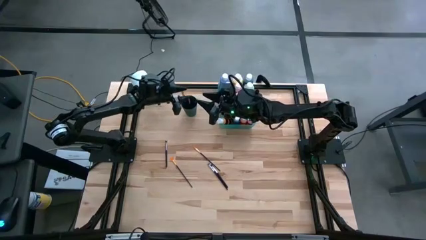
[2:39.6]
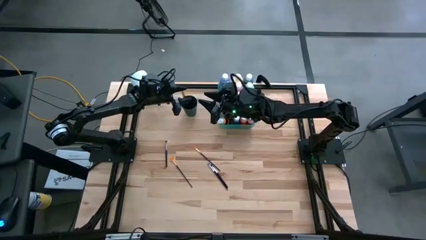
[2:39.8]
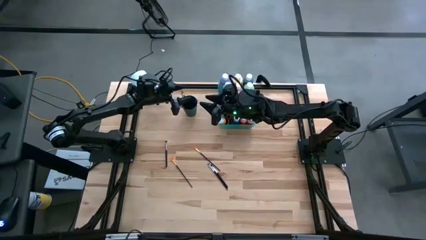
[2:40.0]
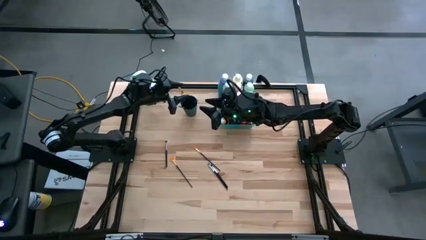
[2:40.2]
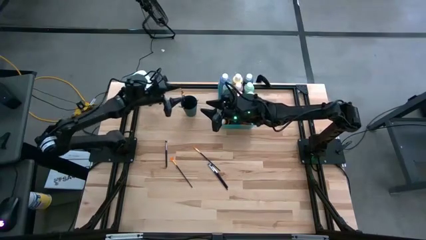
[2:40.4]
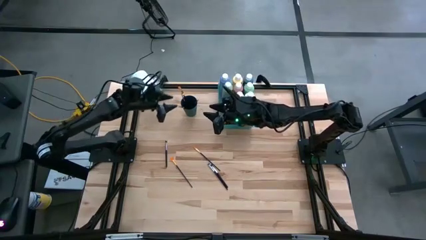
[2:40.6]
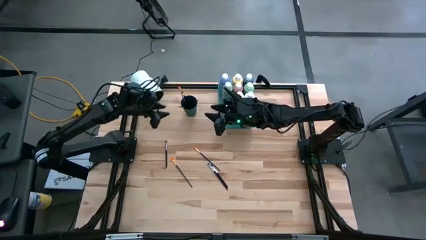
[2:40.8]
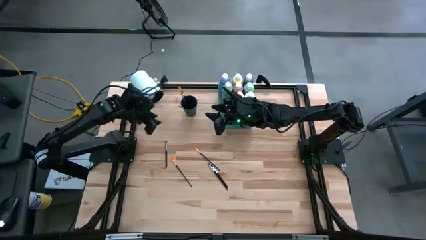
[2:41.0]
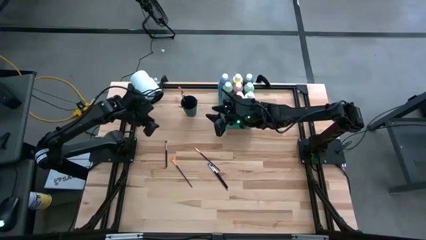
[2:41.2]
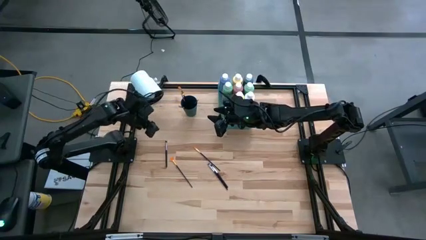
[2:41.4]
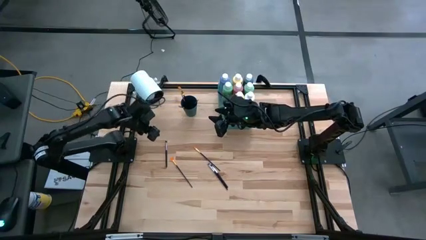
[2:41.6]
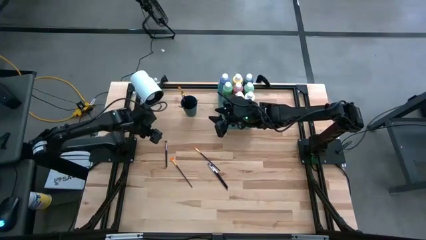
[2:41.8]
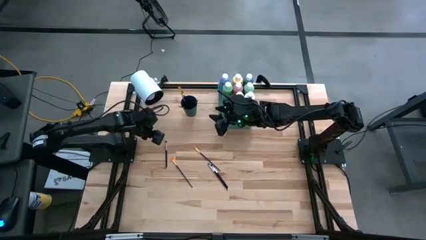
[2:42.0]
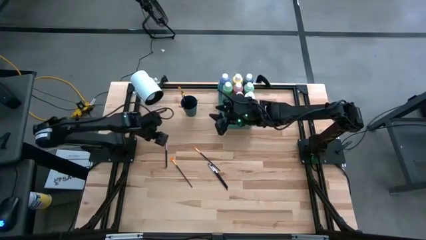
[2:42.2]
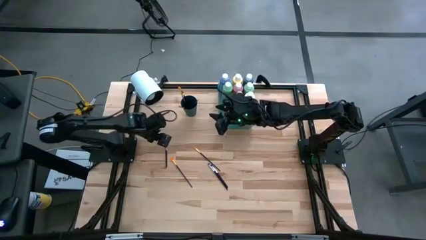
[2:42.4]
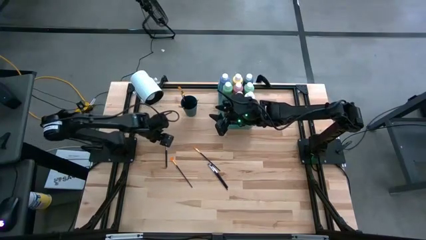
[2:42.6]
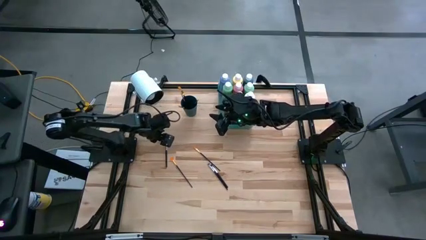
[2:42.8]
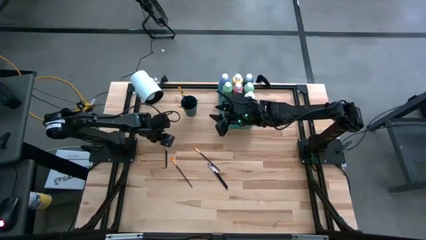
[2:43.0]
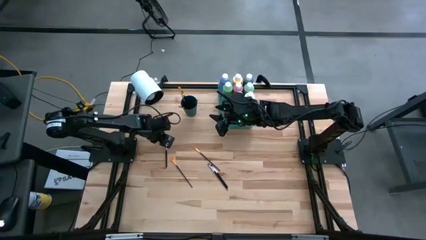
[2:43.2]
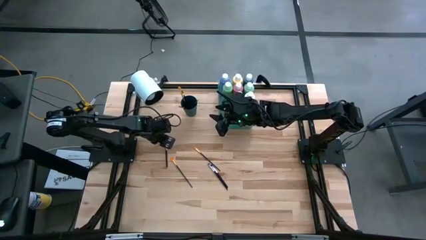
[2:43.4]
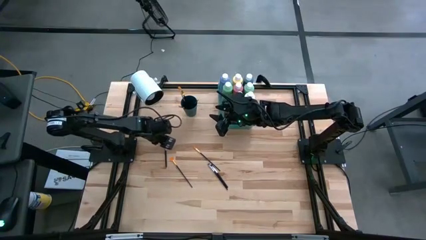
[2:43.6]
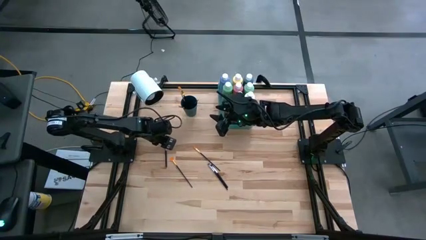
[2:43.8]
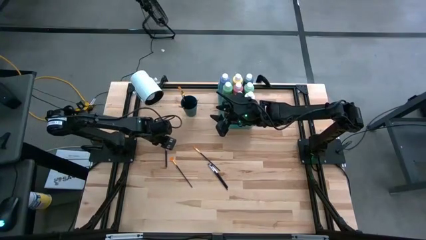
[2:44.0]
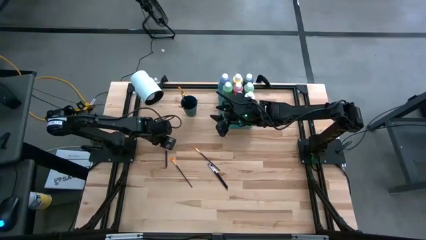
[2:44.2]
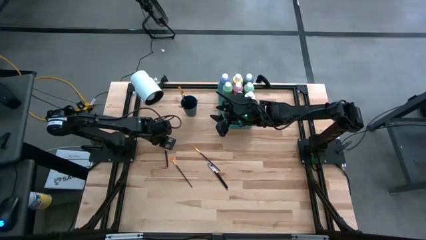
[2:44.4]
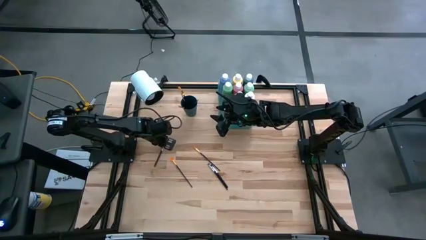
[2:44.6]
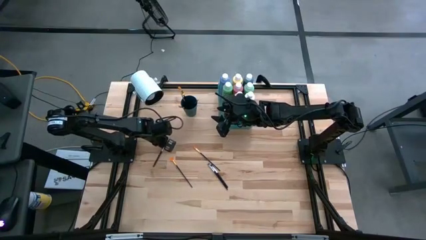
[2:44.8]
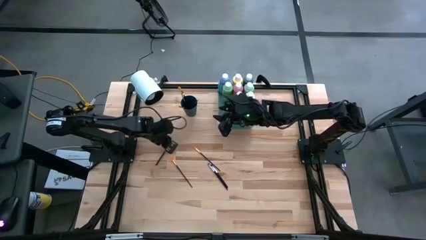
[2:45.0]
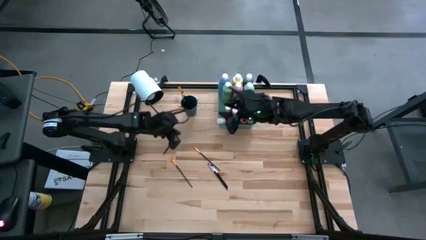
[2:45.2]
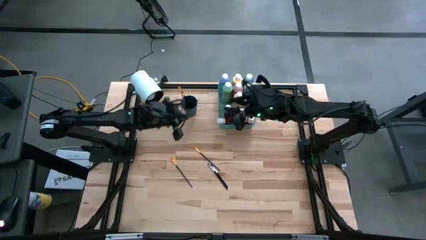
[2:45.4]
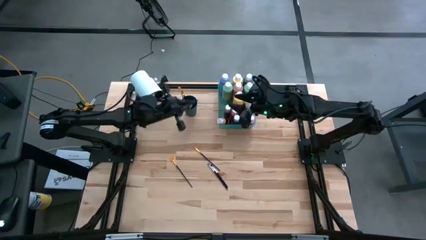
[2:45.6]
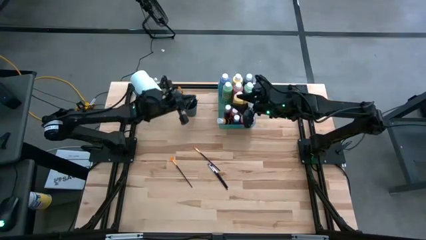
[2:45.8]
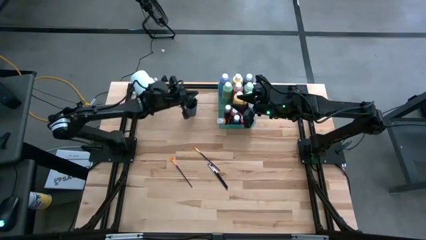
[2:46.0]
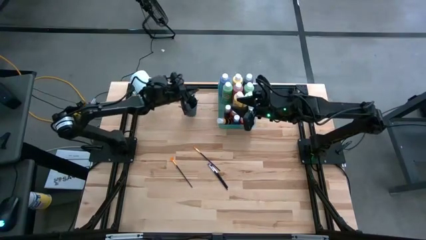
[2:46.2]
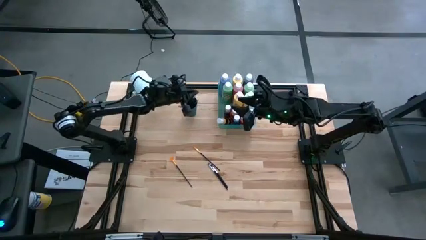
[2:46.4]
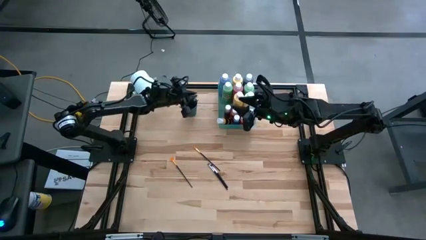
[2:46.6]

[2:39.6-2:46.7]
Task: Pick & Place Paint Supplies
Put the black silver paint brush into the black cup

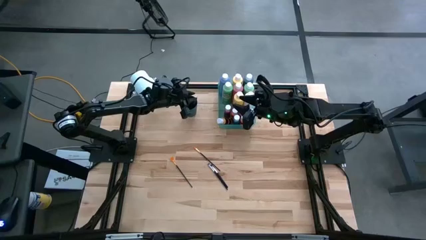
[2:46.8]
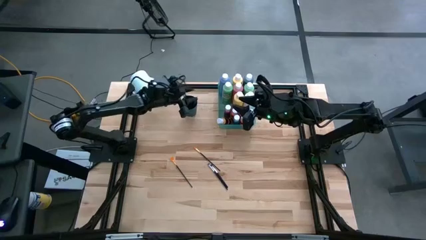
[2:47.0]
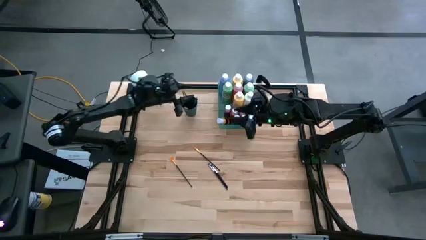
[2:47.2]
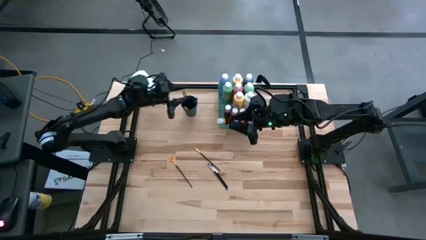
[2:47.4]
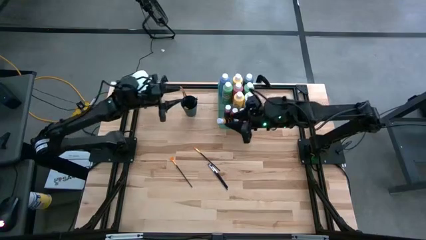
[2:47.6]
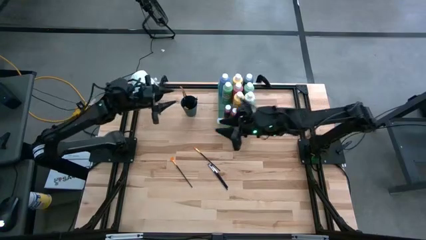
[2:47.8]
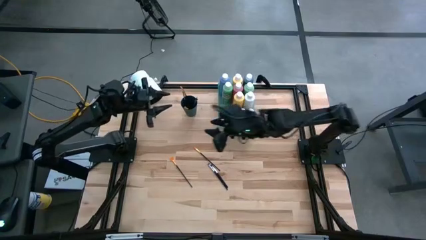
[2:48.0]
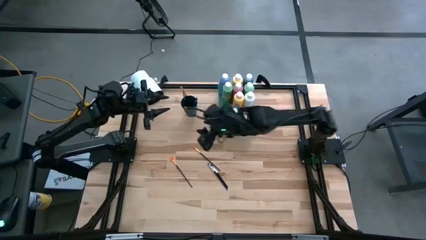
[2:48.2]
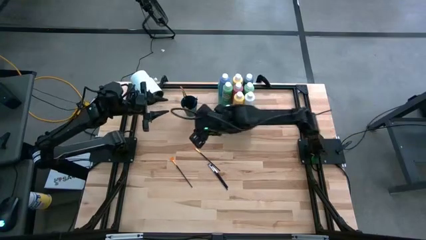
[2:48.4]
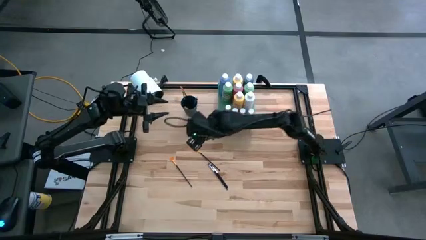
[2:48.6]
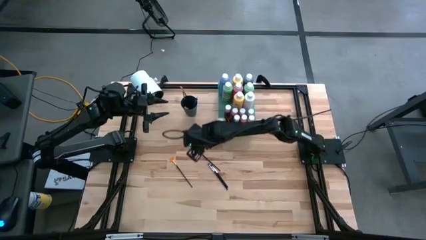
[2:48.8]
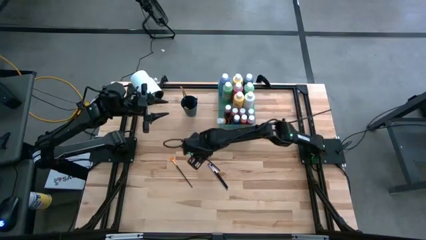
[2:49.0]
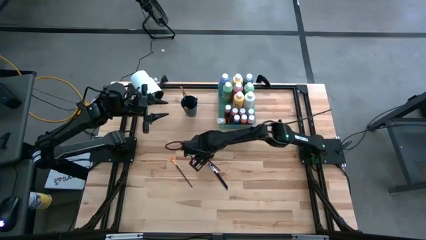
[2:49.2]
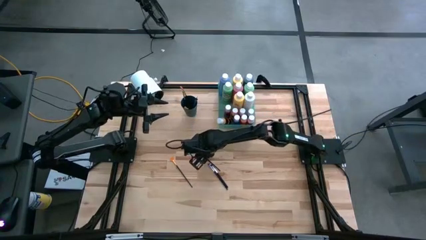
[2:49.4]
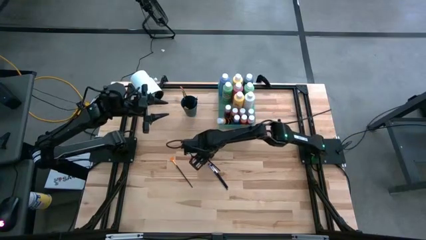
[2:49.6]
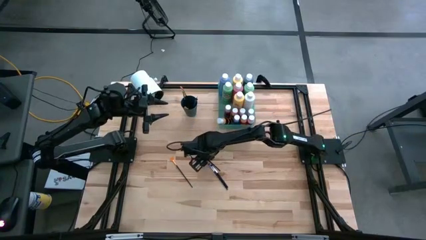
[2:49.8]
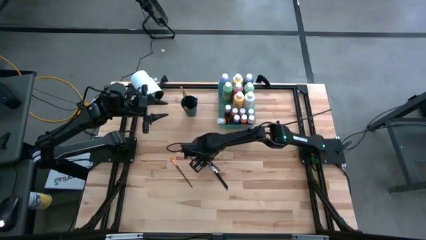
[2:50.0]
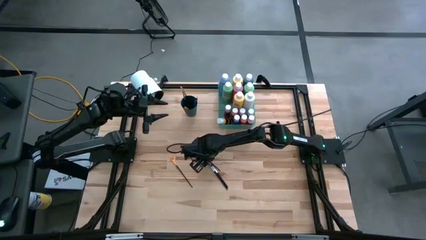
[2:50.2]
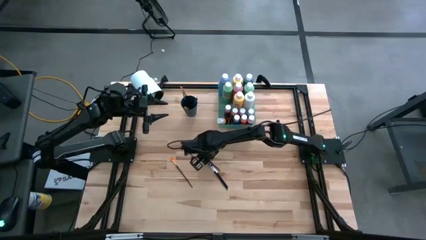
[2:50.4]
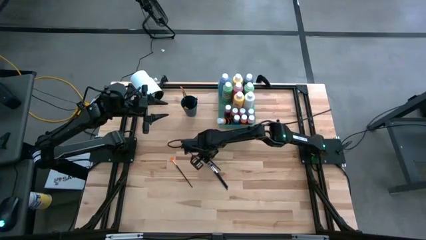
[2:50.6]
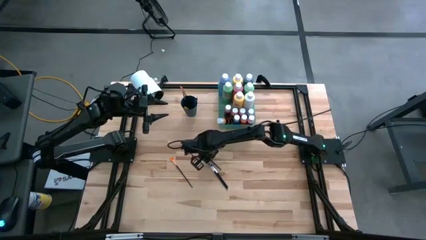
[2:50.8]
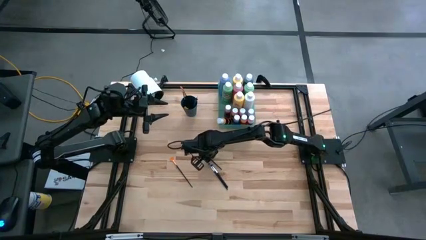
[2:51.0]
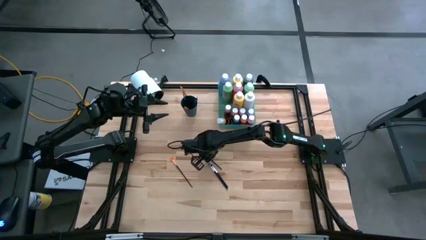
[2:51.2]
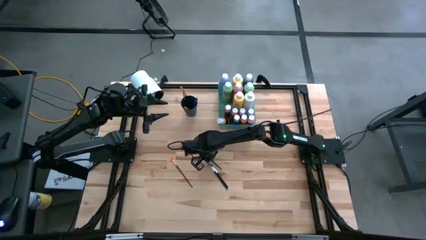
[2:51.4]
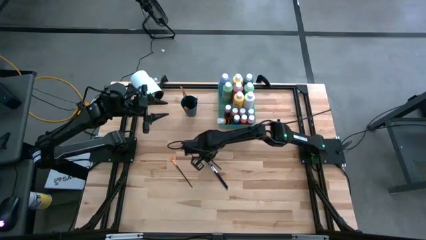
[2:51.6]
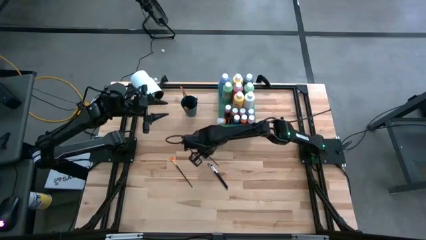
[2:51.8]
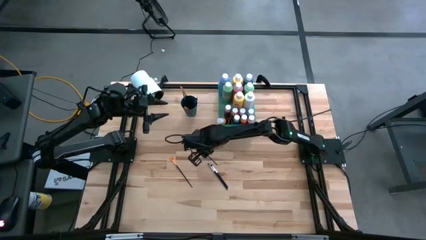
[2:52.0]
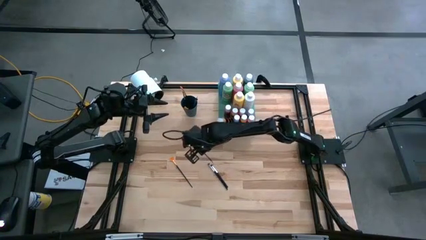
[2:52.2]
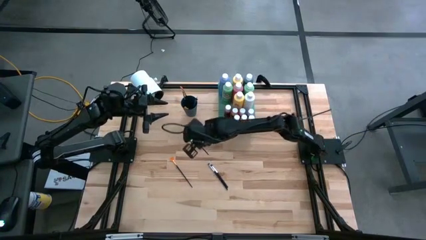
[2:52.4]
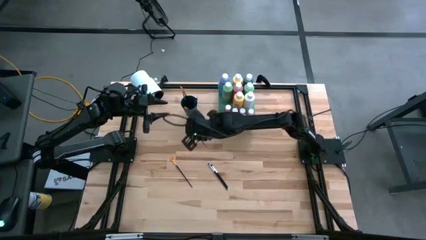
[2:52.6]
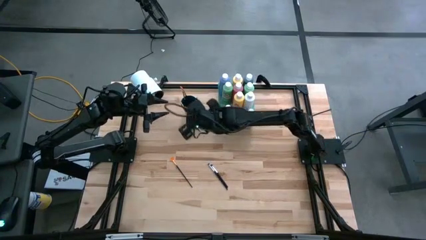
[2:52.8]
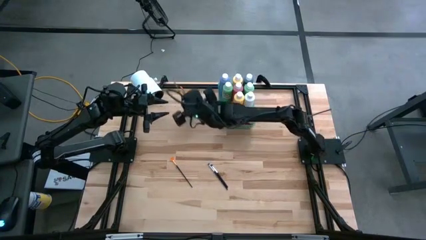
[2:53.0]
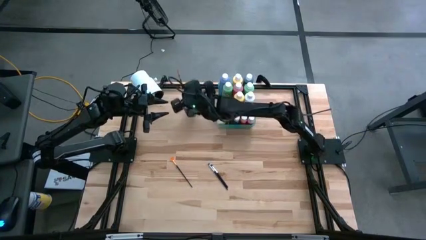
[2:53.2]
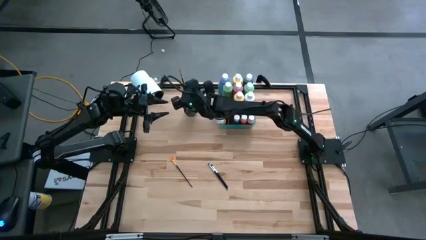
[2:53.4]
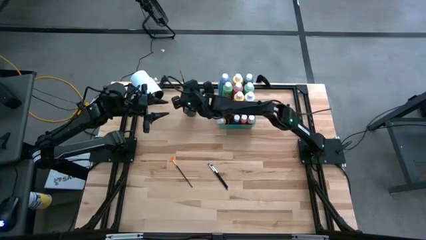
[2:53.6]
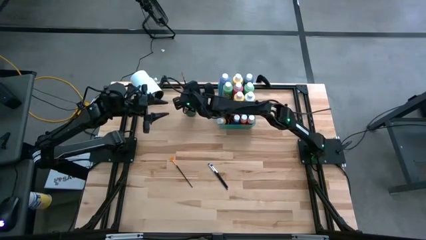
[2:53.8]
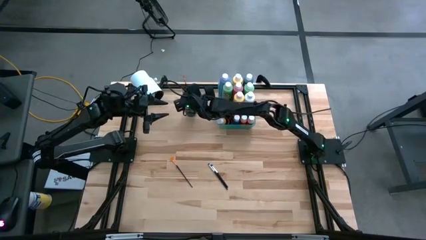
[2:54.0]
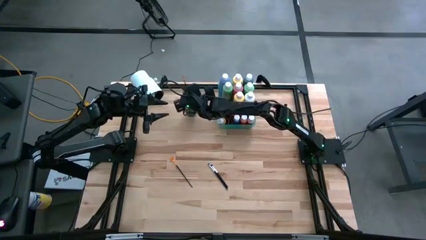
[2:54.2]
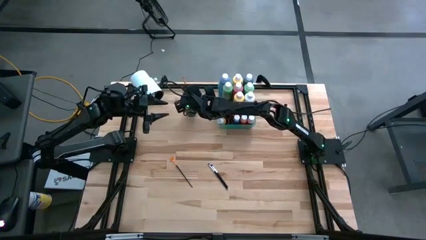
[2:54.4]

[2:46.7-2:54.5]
Put the black gold paint brush into the black cup

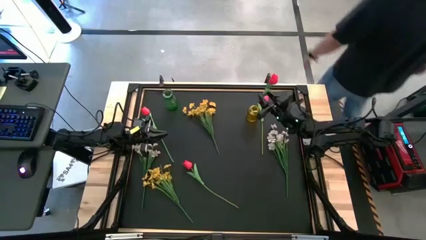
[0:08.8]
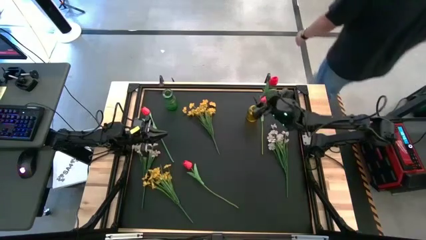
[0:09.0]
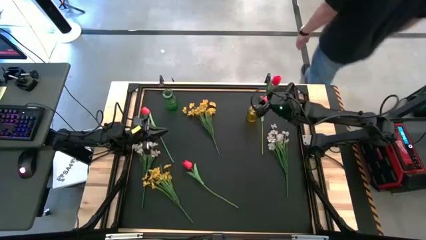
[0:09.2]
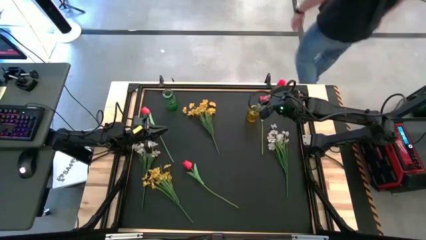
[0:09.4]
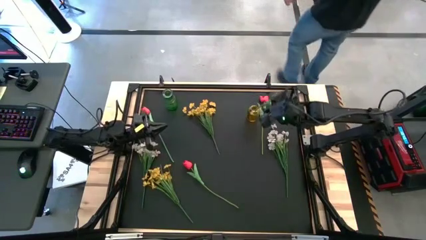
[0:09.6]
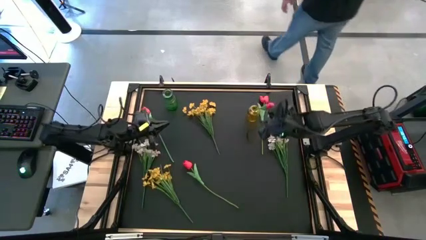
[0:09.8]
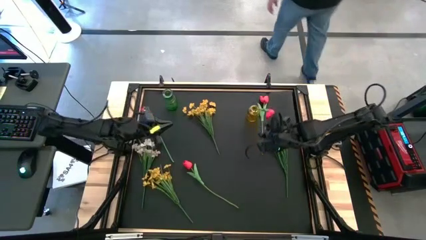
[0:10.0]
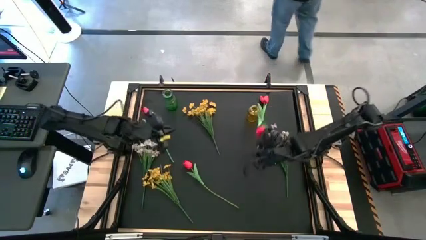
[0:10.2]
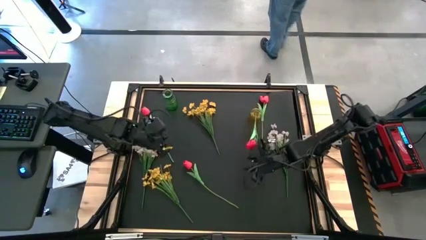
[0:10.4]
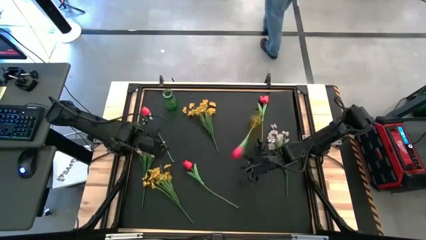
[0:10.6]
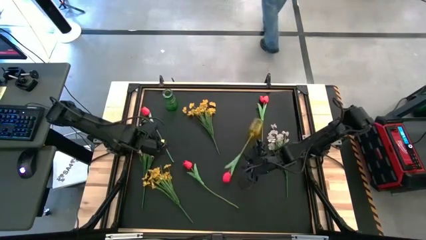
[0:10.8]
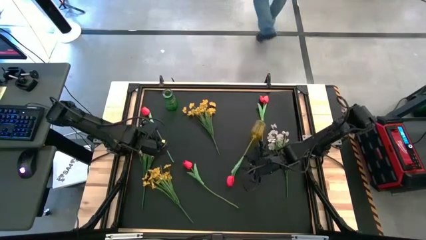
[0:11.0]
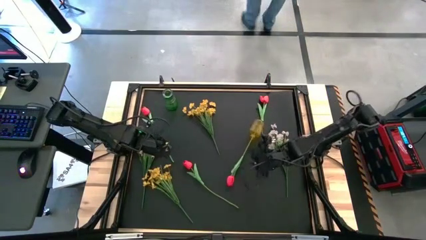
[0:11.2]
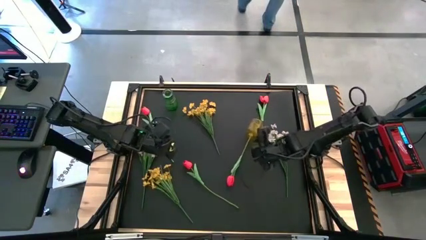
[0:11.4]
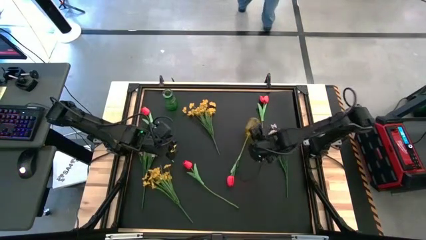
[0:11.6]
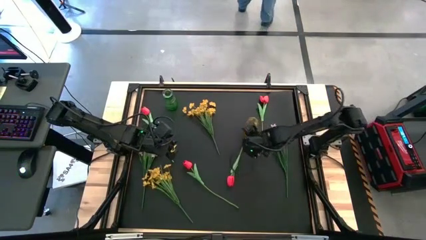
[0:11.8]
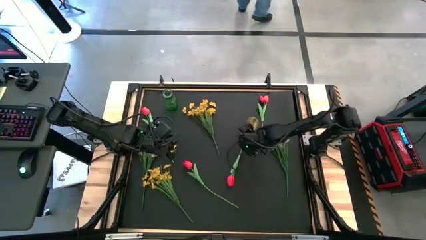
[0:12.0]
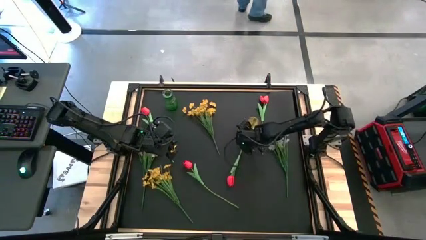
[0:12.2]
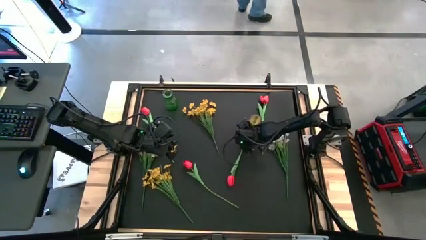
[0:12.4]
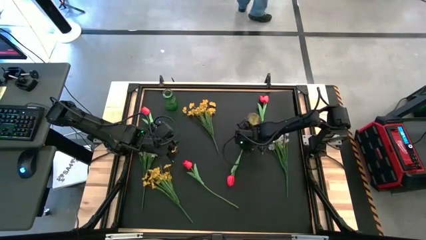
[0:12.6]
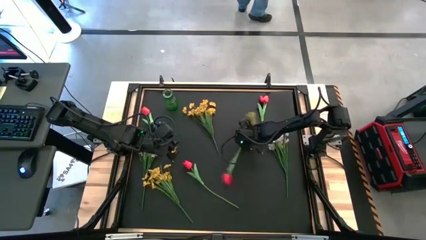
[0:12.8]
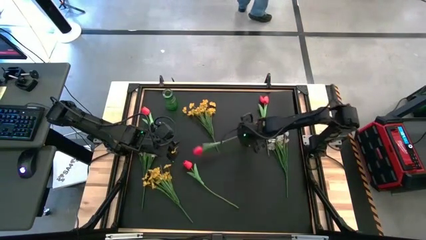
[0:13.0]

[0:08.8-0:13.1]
Task: Sort flowers into vase by color
Adjust the yellow vase
